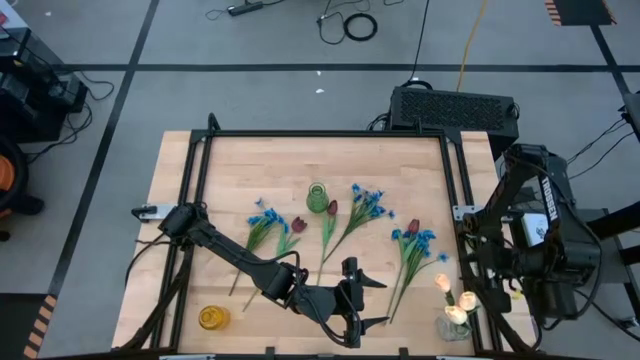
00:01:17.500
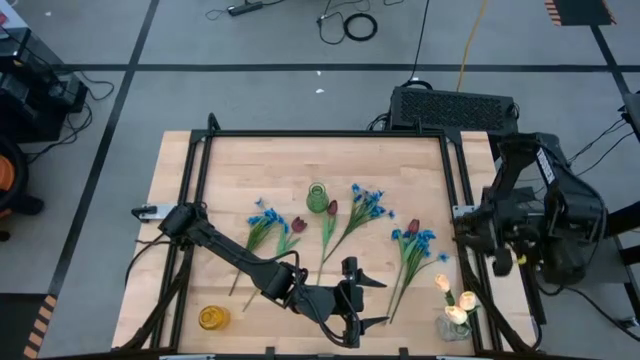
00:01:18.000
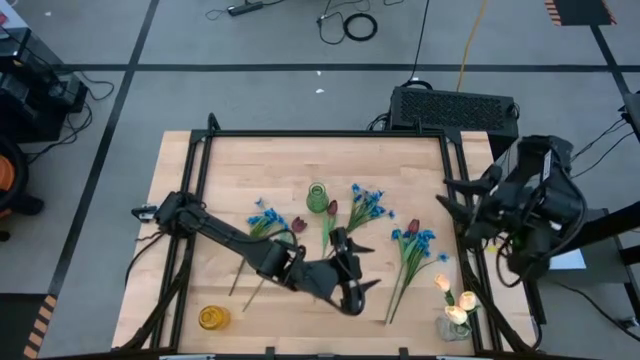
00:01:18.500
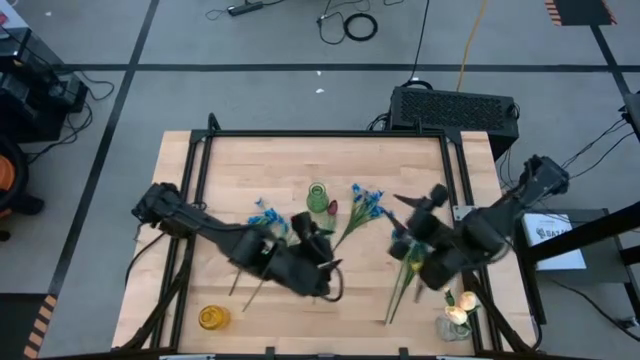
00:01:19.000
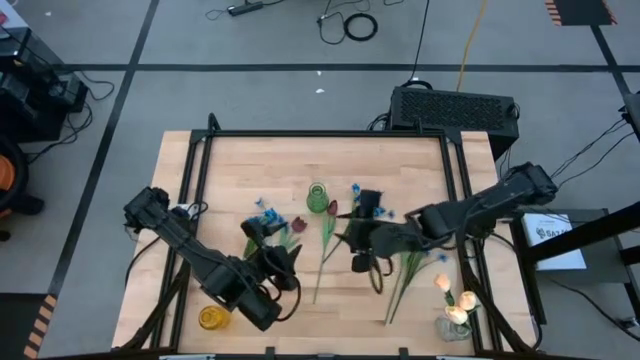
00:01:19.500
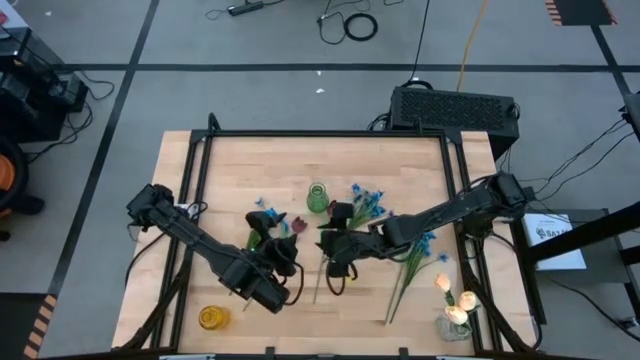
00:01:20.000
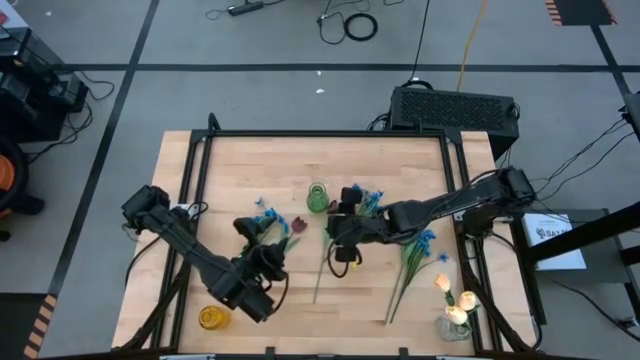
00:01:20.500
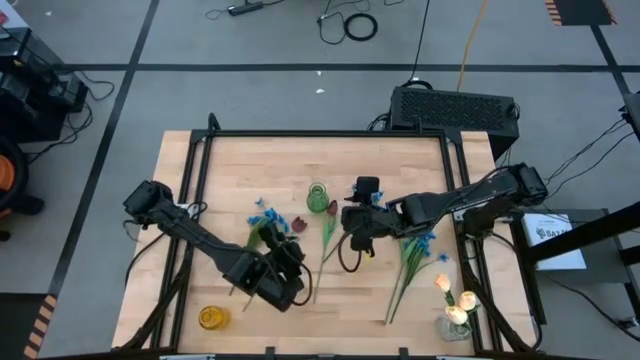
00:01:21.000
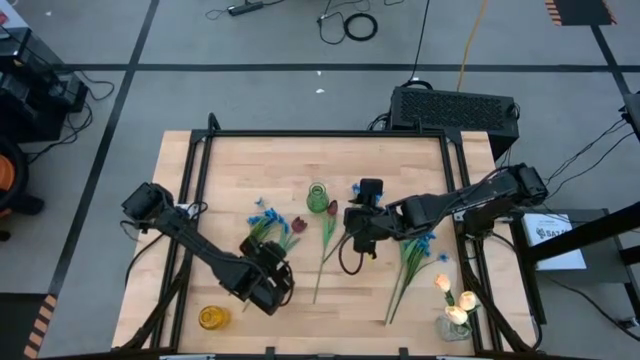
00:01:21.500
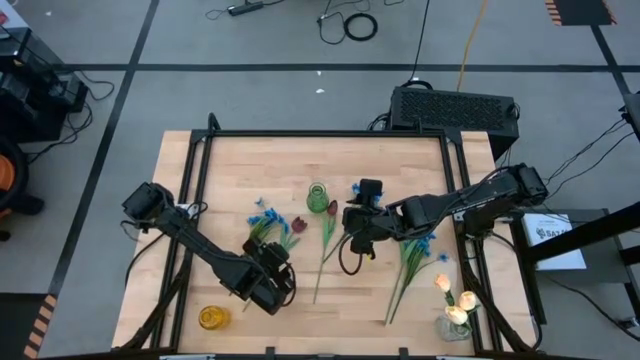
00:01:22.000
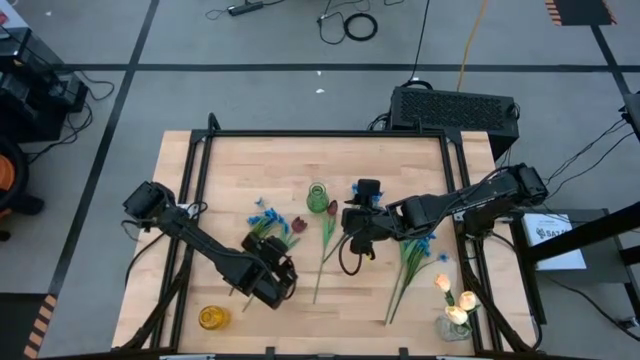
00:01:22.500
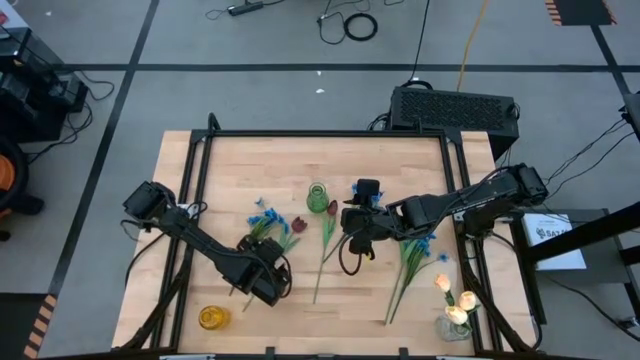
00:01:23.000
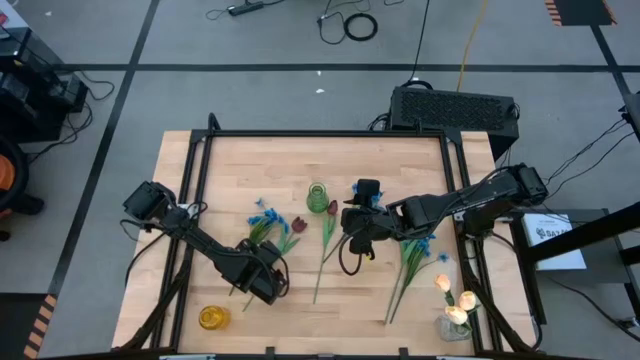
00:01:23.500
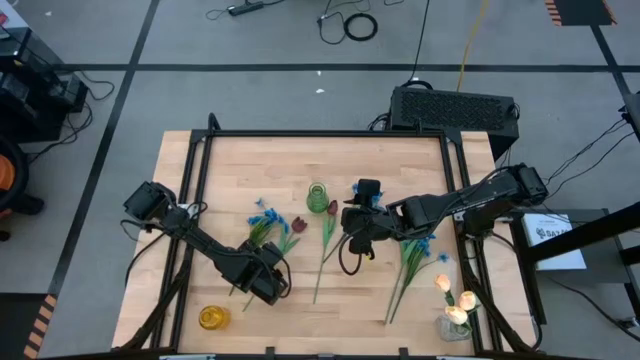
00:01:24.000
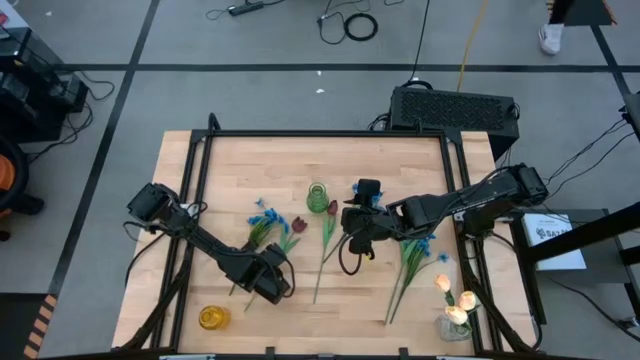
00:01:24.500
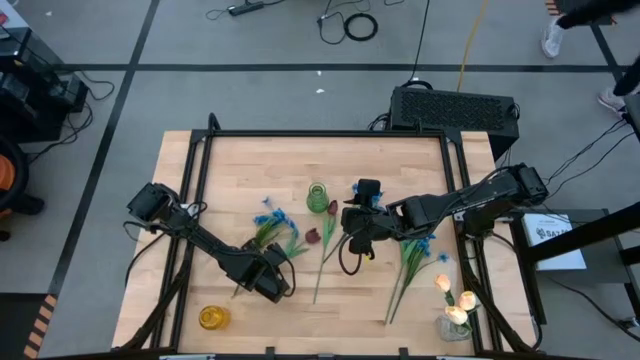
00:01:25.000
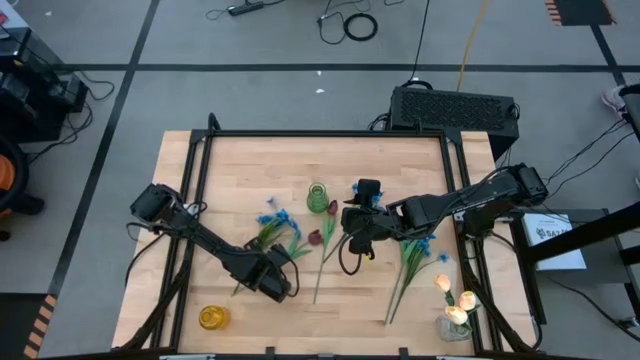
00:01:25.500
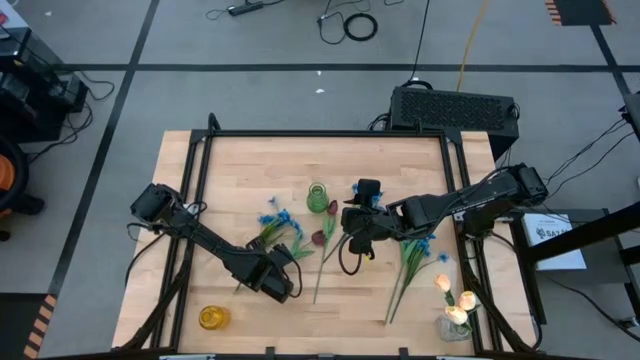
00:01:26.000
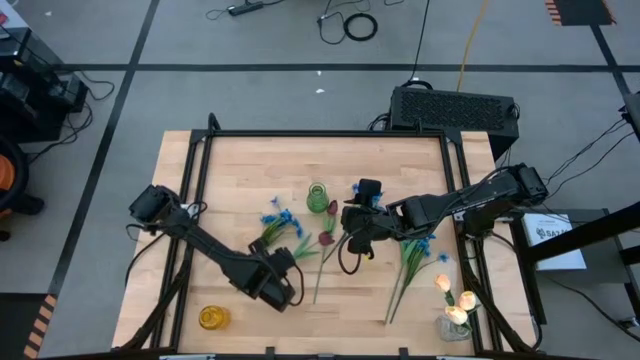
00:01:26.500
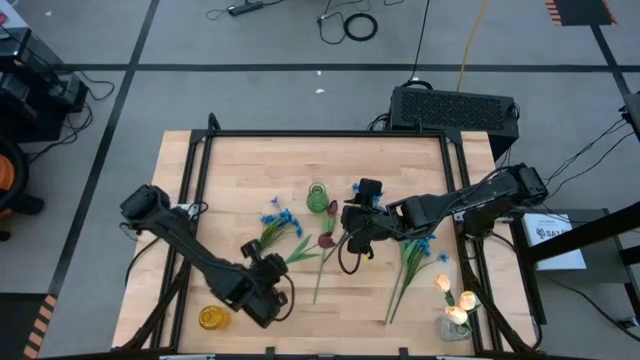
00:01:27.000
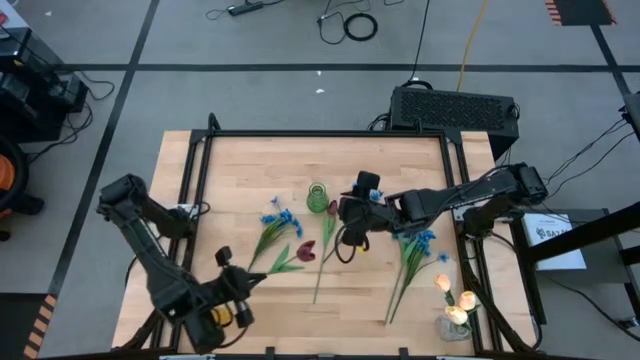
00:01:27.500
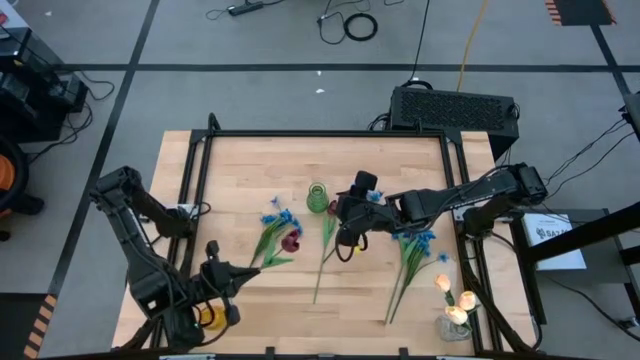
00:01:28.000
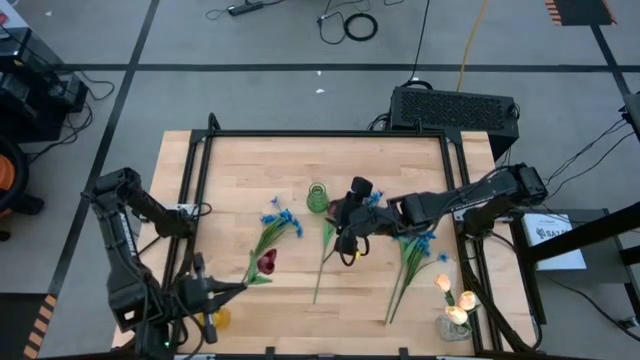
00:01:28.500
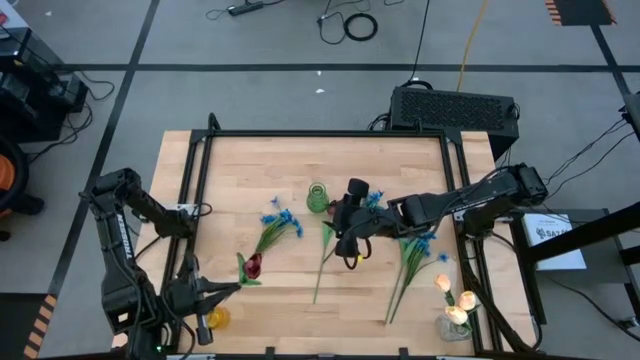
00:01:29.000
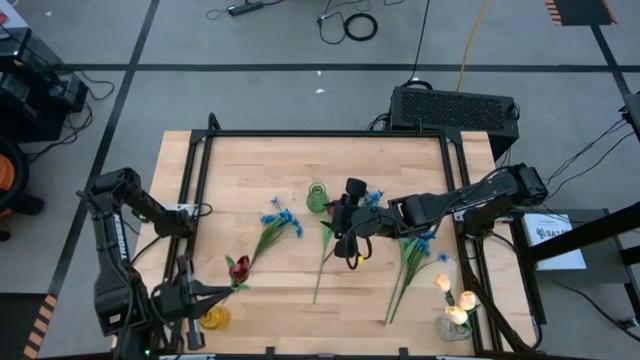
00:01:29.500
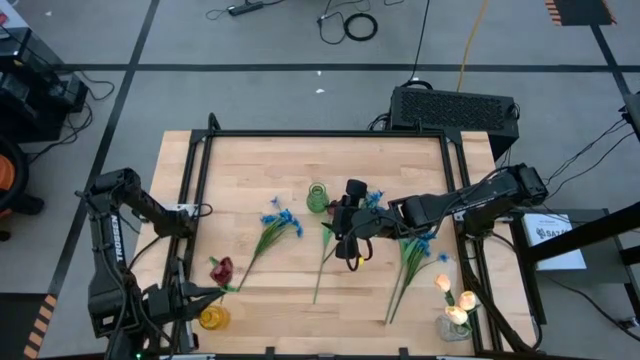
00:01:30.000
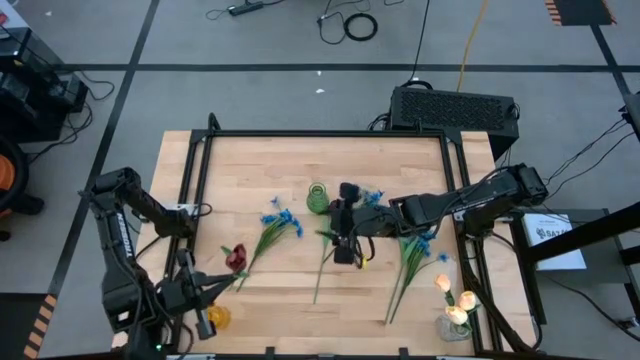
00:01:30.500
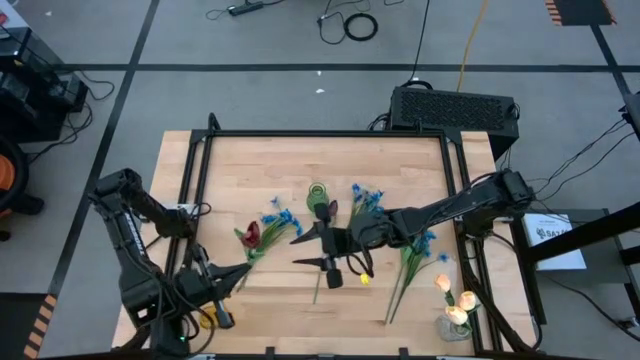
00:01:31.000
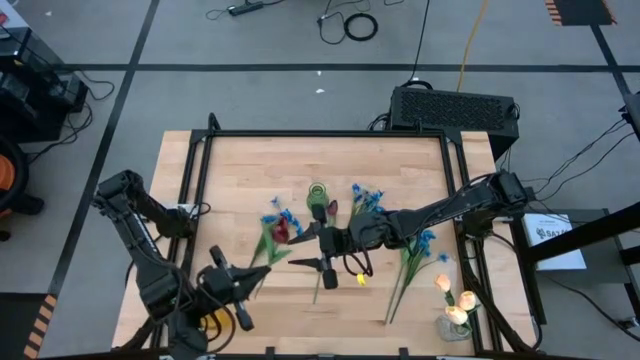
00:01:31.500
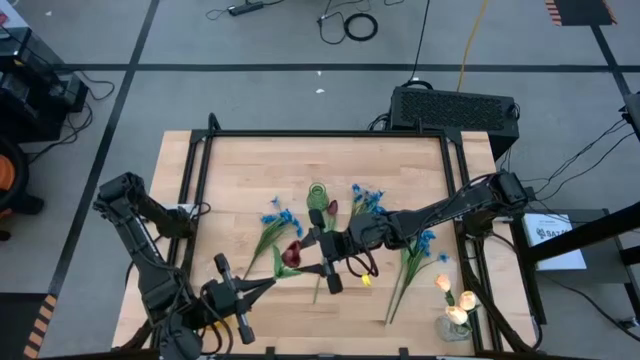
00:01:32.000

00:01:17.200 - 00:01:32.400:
Task: Sort flowers into vase by color
Put the left red flower into the yellow vase

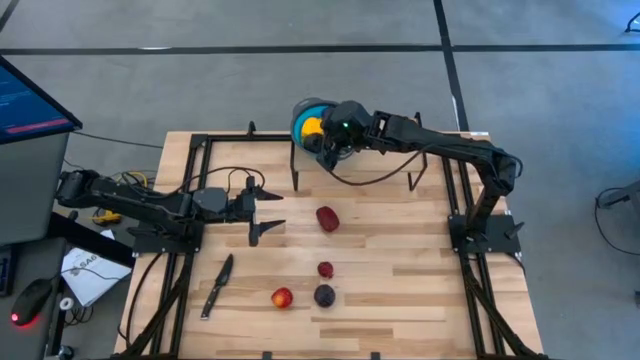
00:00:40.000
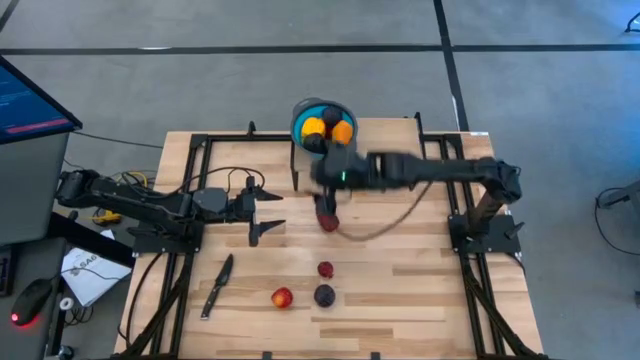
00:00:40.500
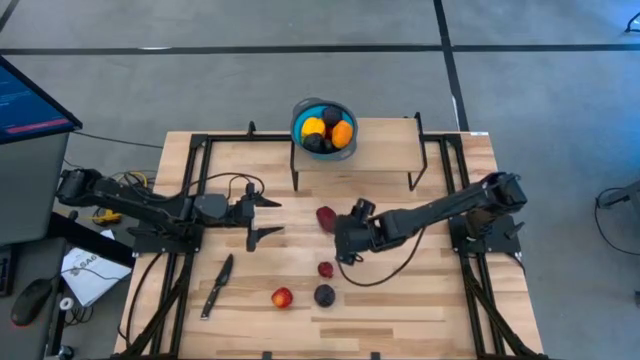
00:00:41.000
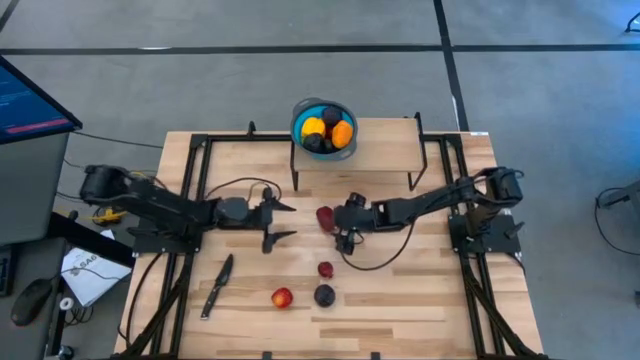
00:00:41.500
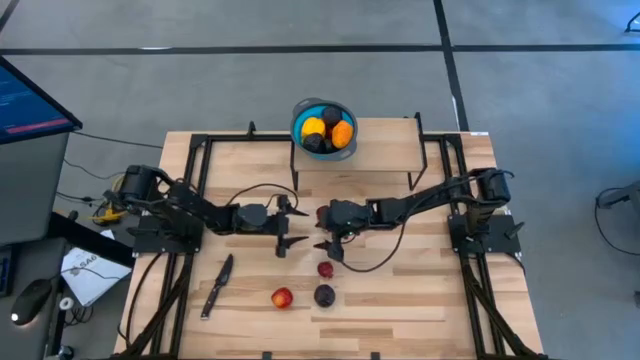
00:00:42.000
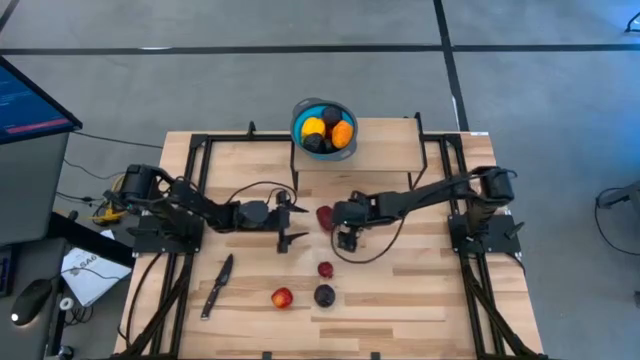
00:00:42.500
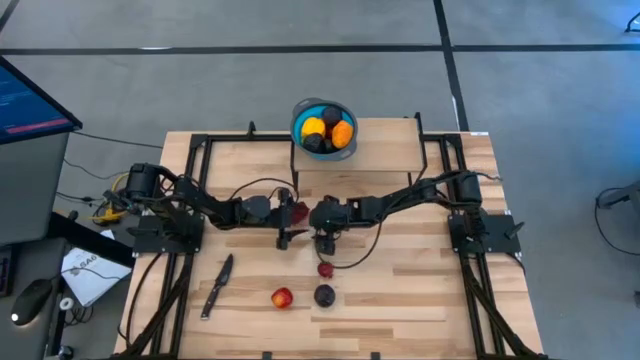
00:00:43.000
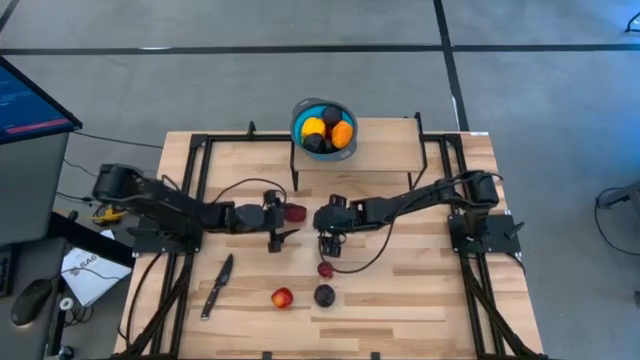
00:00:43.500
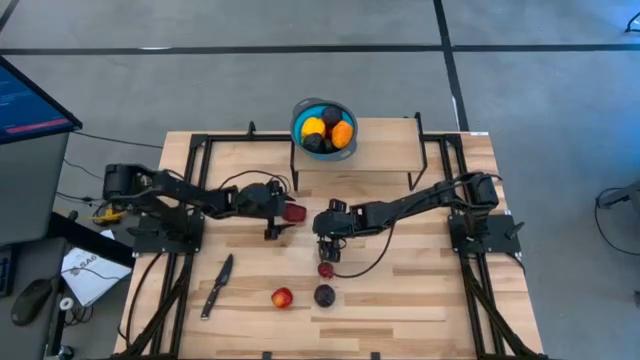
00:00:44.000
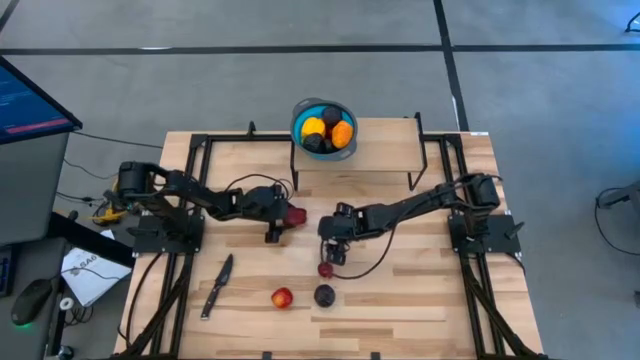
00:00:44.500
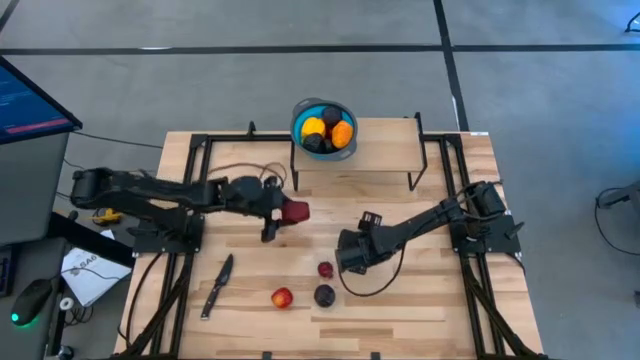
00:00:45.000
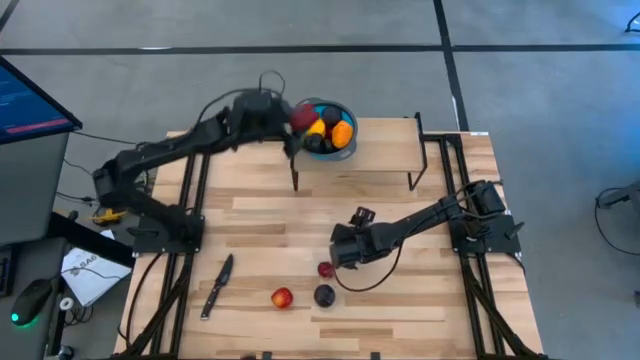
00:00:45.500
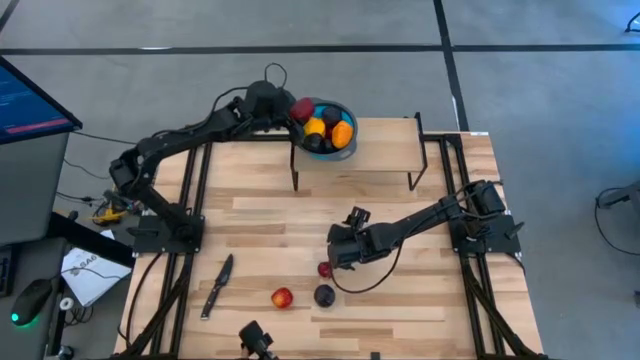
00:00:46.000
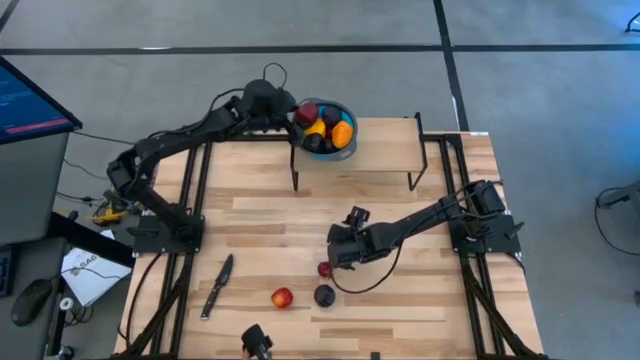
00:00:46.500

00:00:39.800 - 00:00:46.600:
Task: Pick & Place Fruit
Put the top red apple into the blue strainer bowl on the shelf

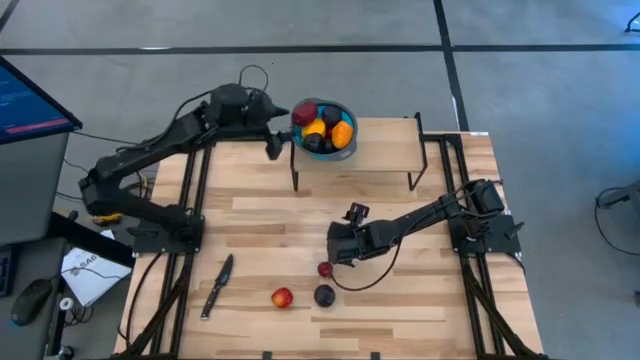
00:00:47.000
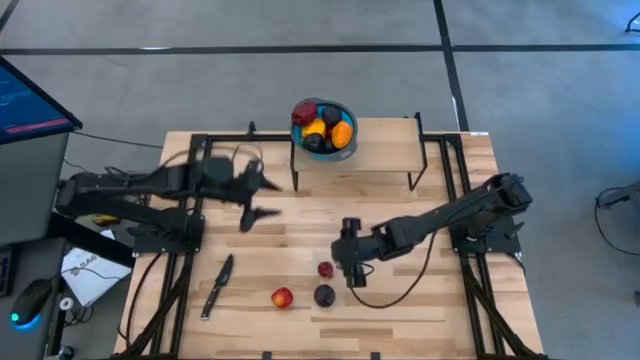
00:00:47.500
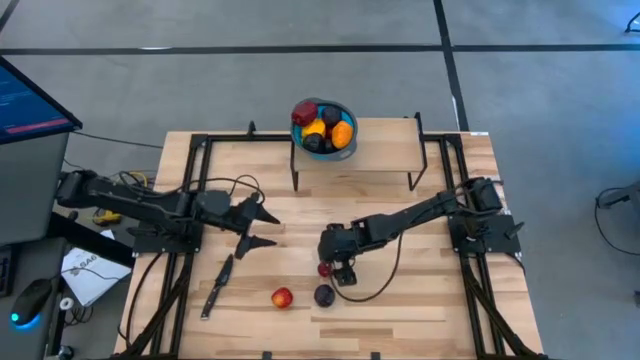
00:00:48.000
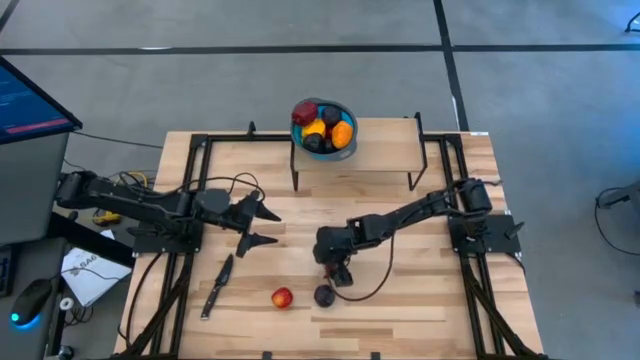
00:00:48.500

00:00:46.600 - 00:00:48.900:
Put the red pomegranate into the blue strainer bowl on the shelf
